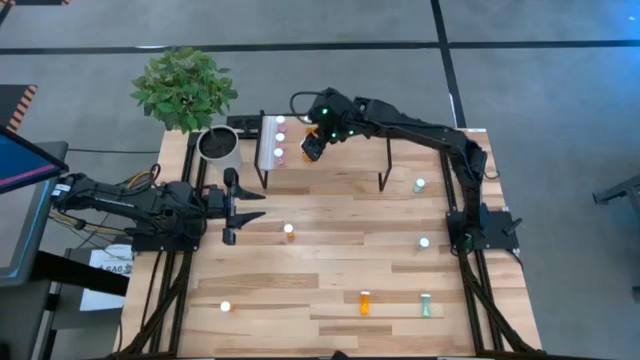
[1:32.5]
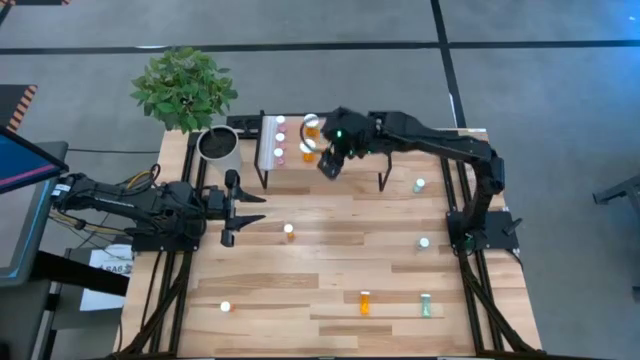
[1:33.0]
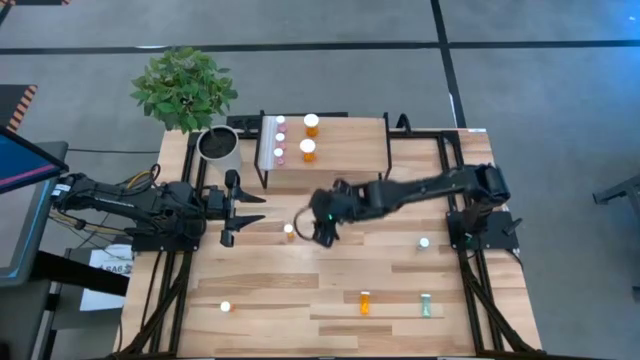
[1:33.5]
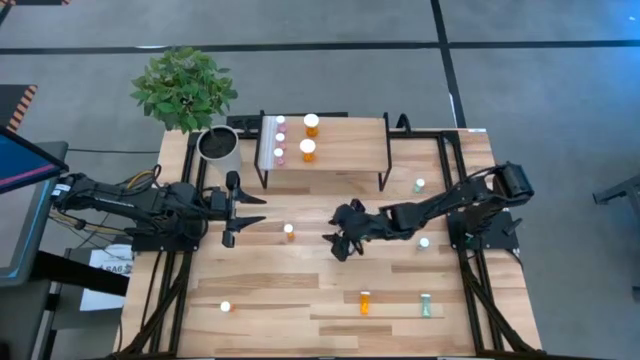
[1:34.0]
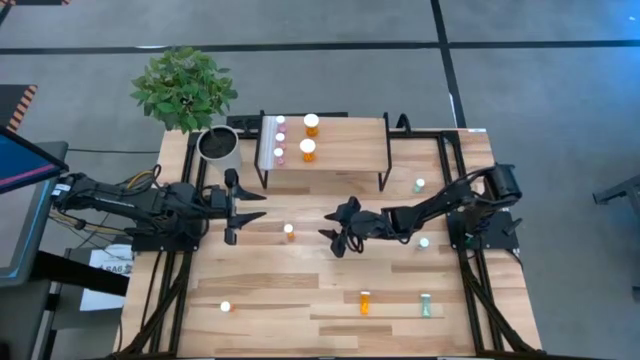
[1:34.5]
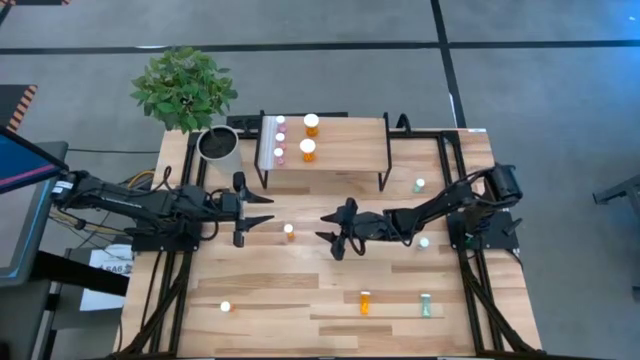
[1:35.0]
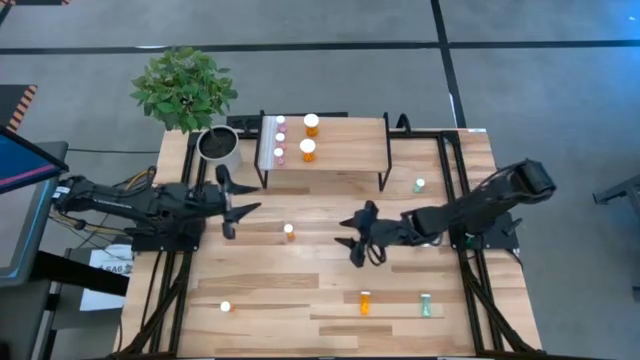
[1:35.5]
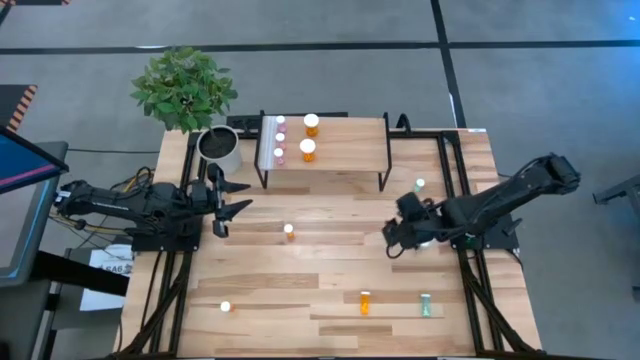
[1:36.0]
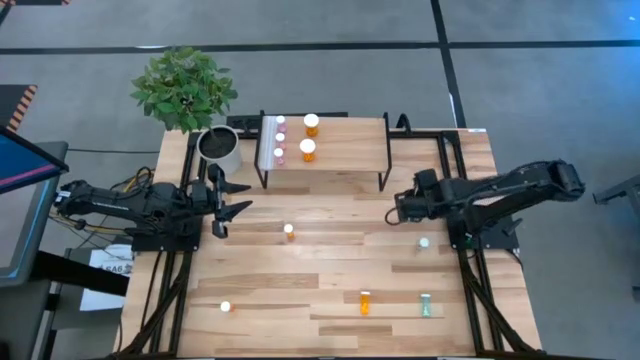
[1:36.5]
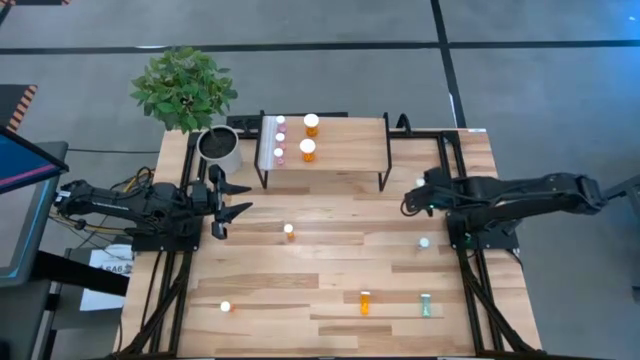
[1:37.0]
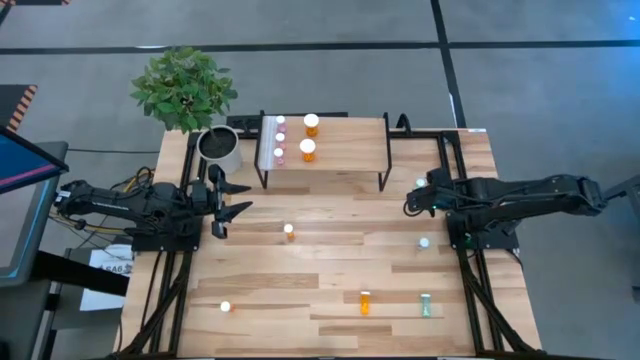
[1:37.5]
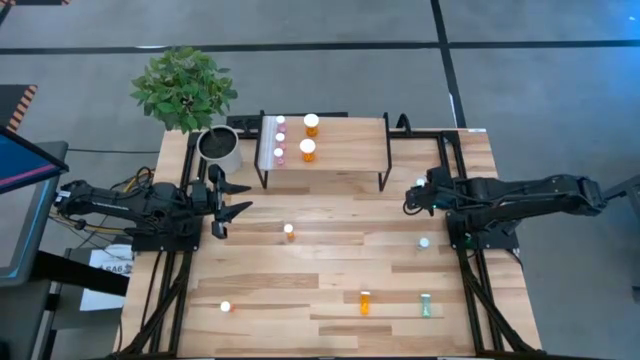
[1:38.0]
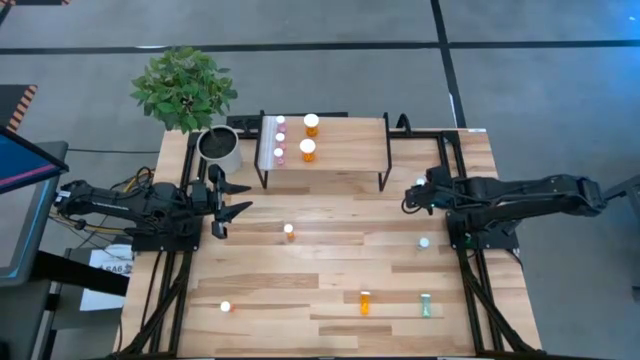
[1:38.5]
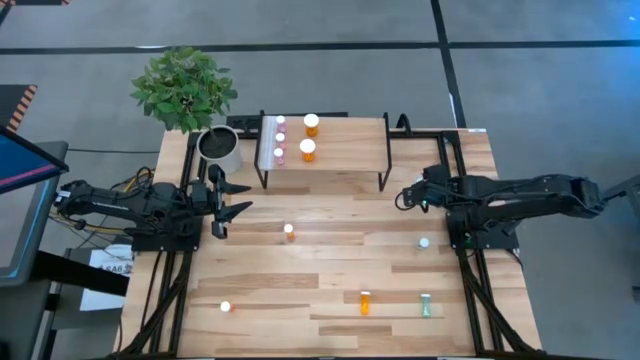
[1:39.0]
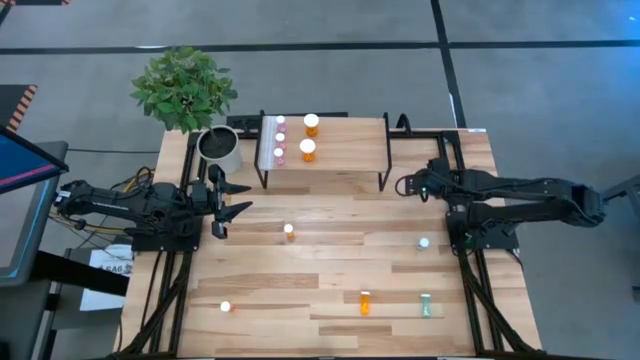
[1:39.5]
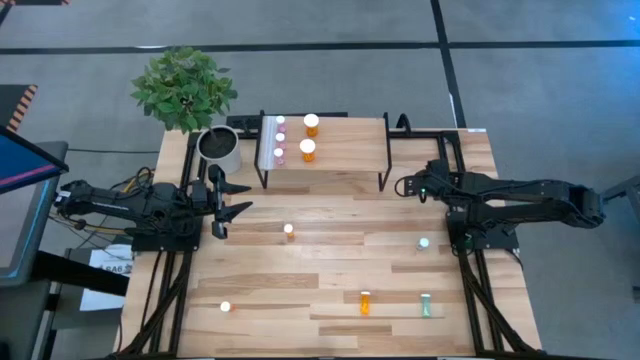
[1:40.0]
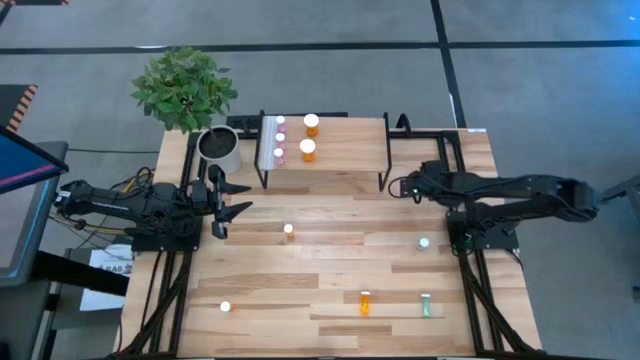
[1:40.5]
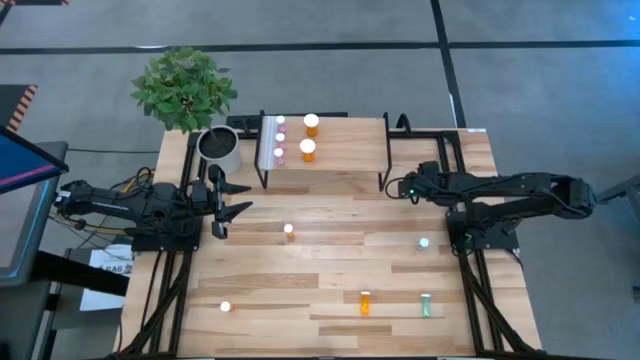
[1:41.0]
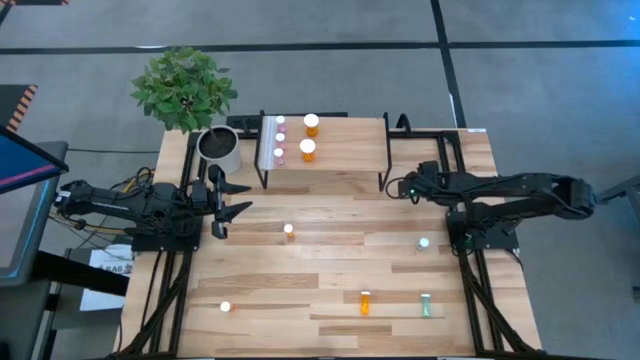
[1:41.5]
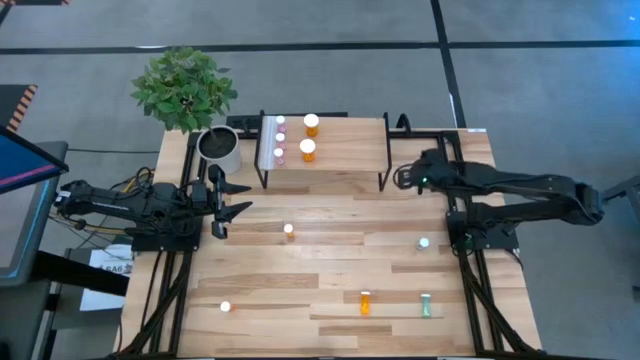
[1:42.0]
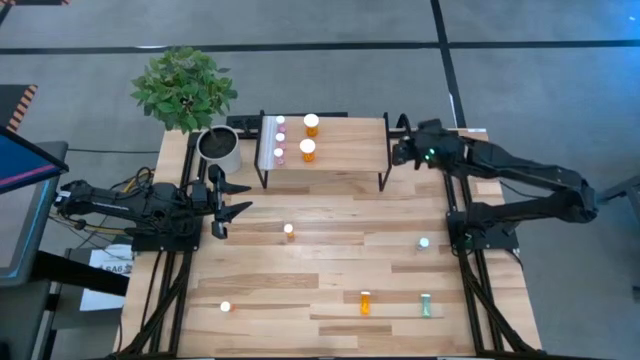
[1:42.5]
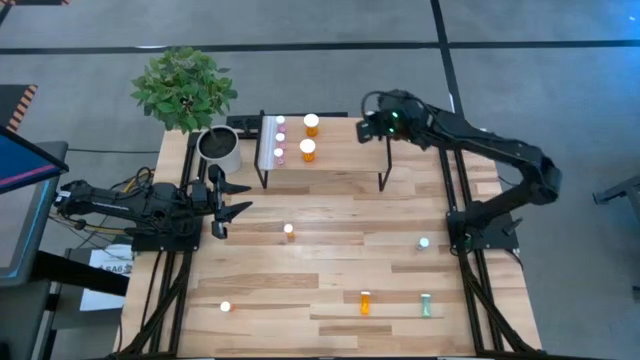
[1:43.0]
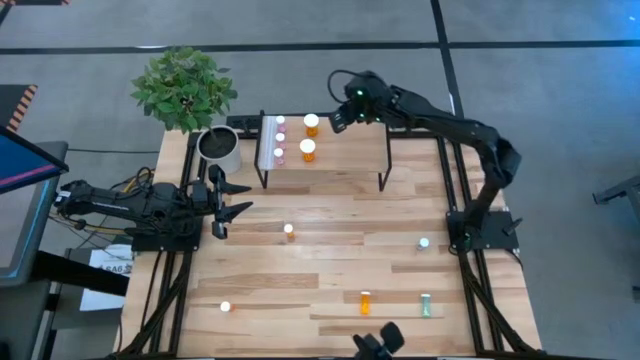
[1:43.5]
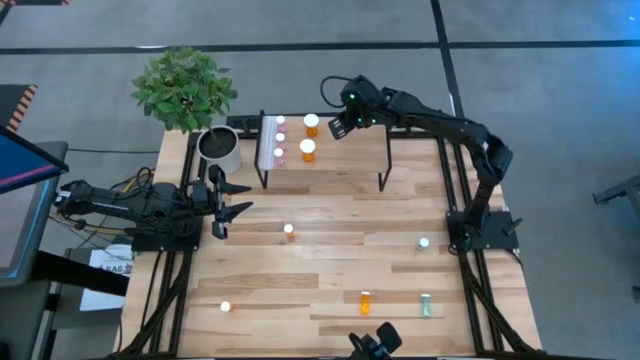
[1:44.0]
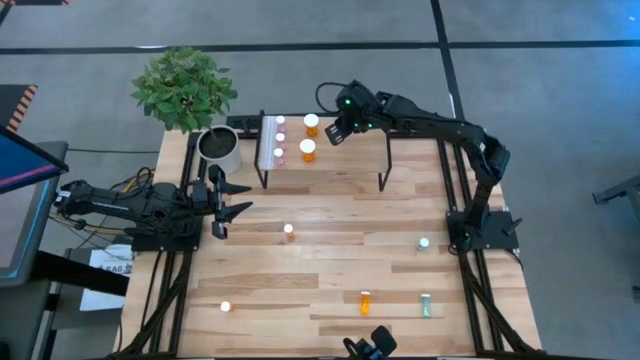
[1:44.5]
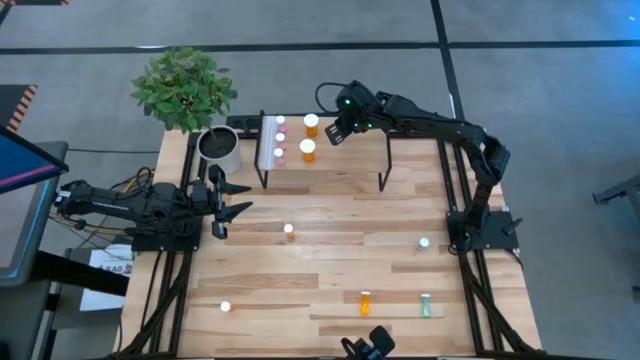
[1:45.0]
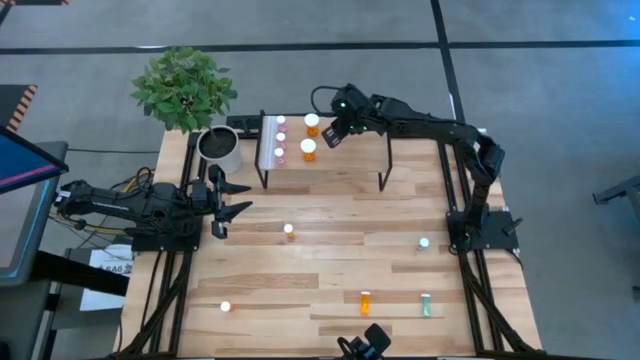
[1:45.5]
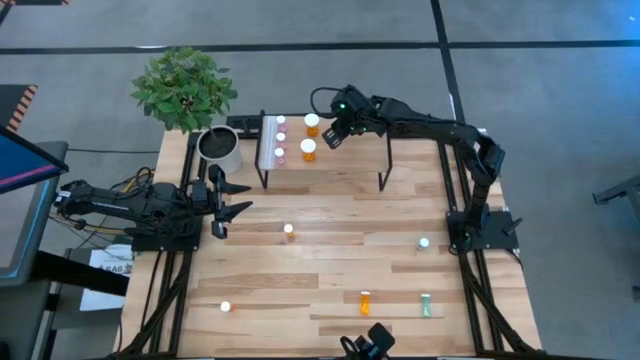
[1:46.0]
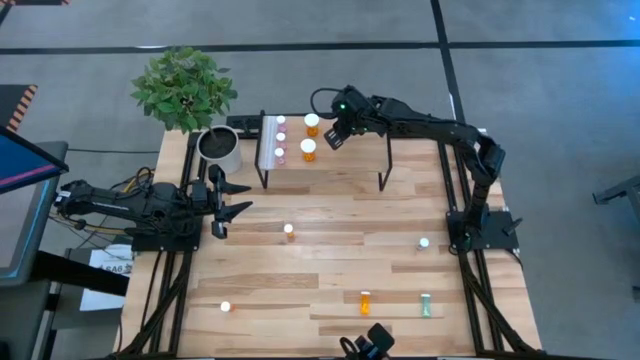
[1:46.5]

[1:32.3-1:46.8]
Task: Pick and place medicine bottles onto shelf by color
Put the top green pill bottle on the shelf

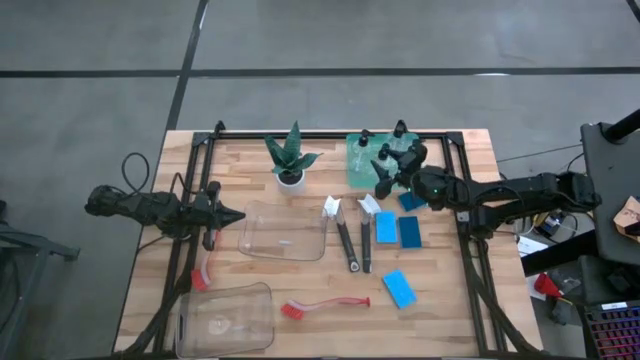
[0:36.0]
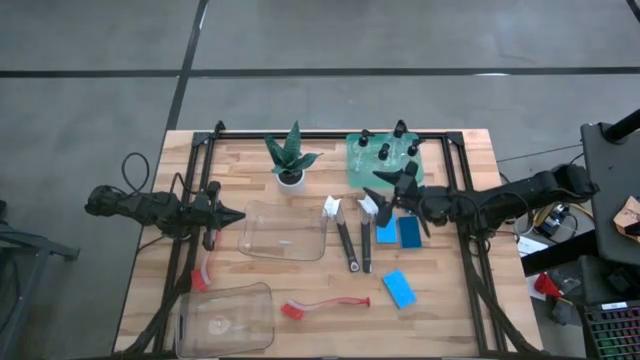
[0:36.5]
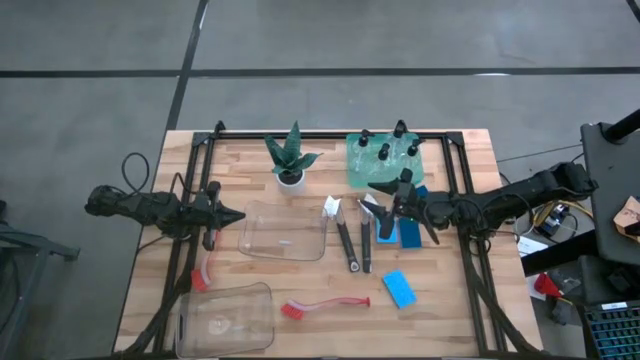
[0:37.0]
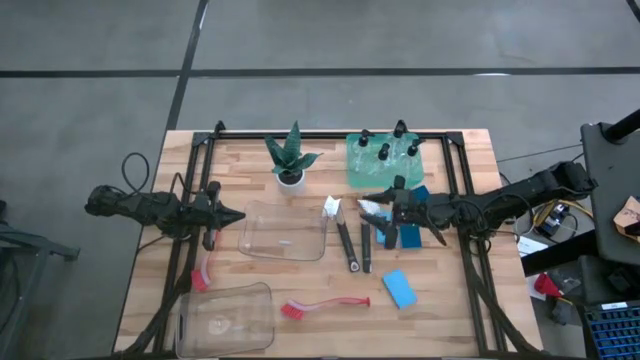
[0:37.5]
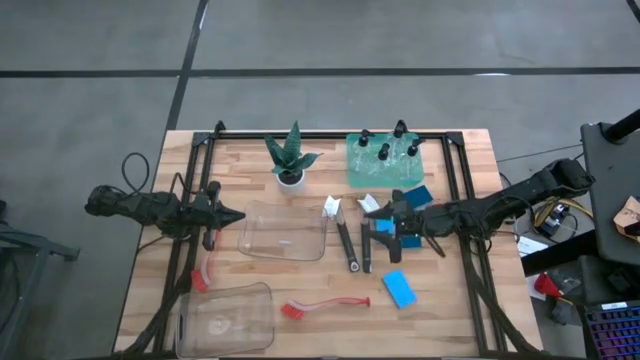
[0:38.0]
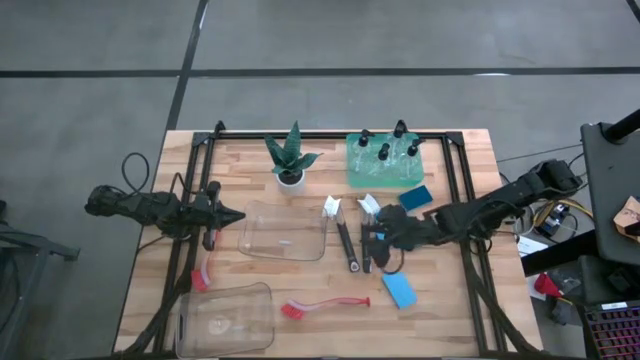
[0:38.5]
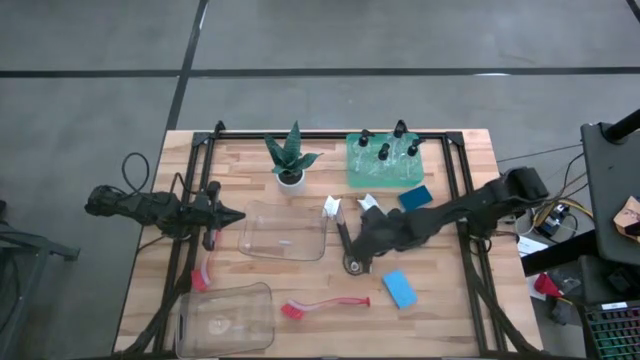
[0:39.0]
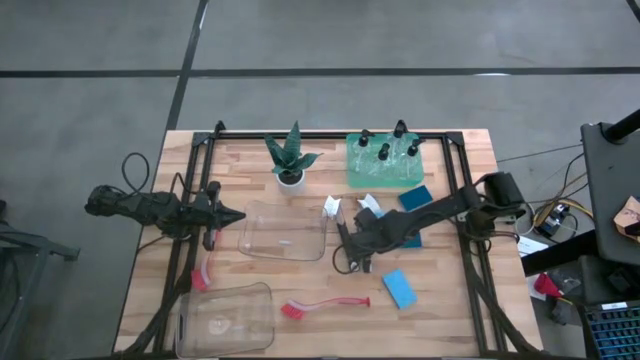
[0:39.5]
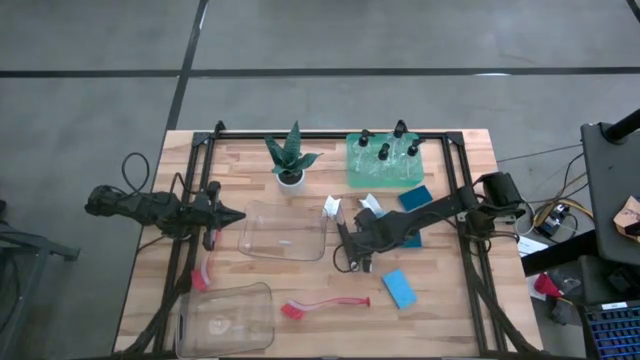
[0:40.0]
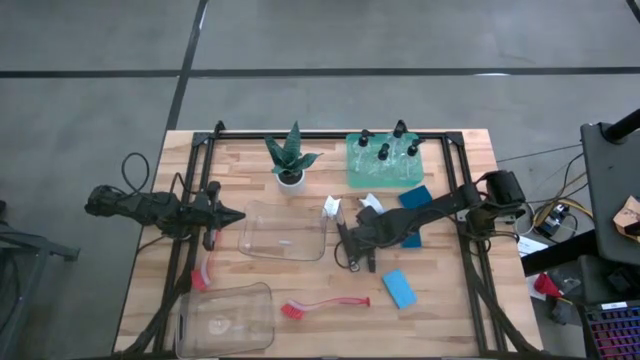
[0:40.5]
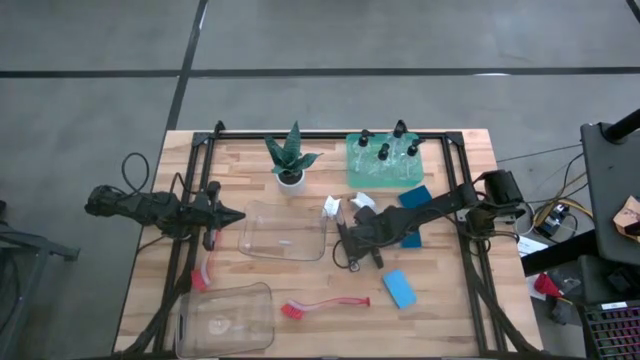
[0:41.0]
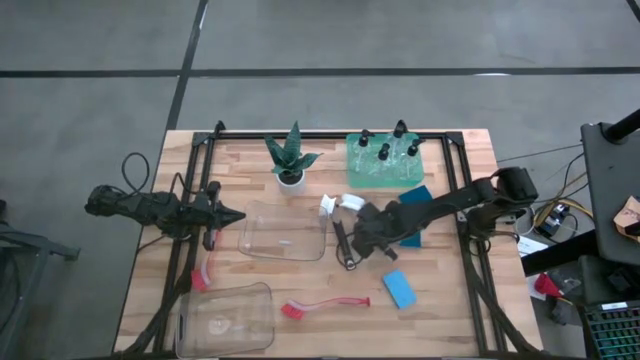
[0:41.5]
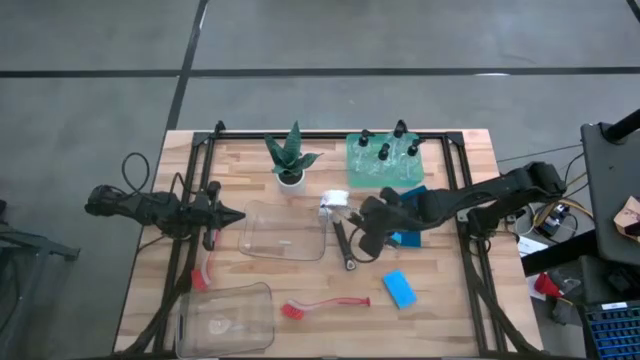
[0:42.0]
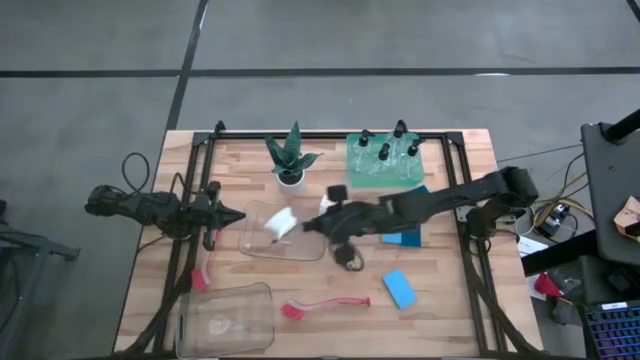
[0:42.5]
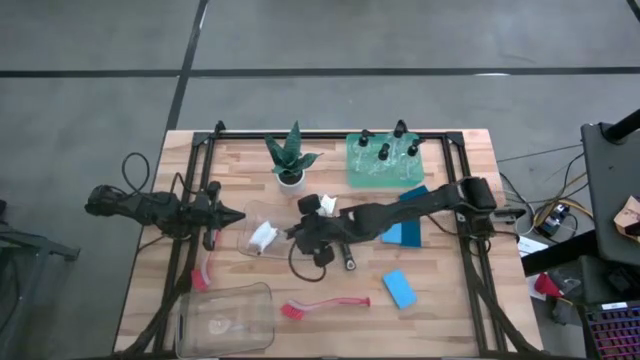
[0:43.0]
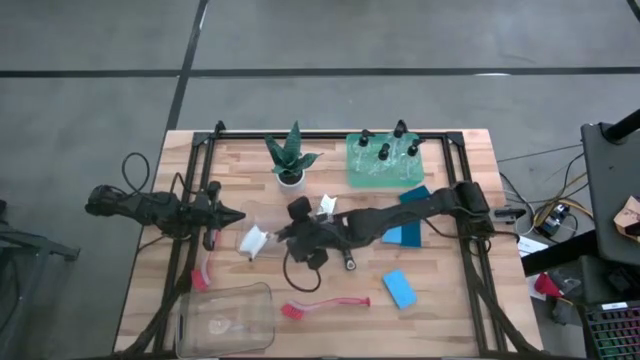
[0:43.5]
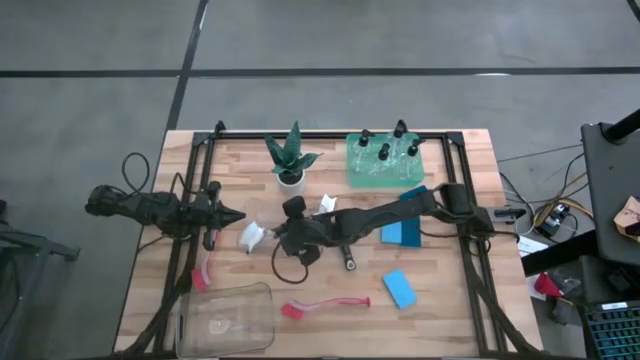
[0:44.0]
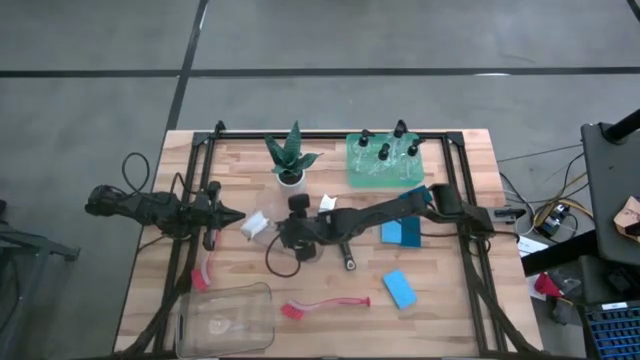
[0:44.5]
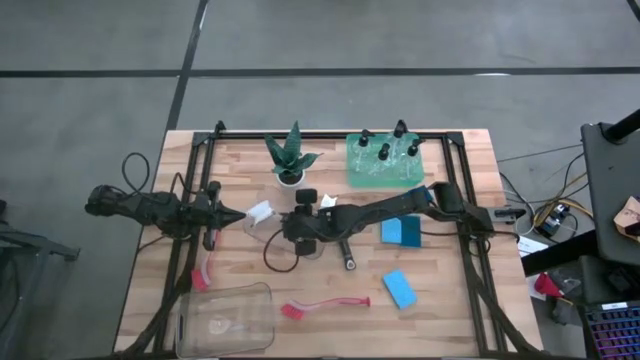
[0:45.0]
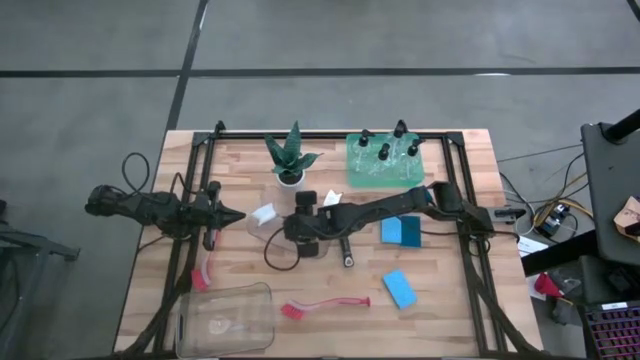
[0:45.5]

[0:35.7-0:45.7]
Task: Pick & Place Kitchen Sink Supplies
Put the black dish brush into the top transparent bin
